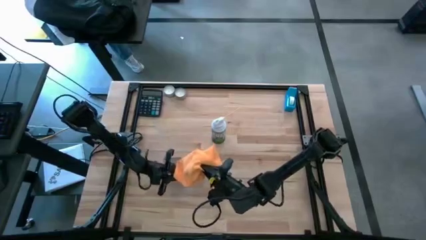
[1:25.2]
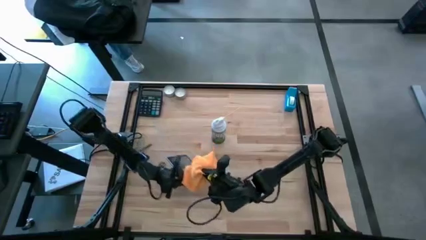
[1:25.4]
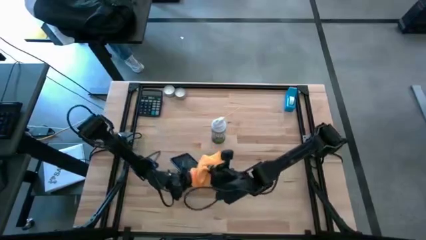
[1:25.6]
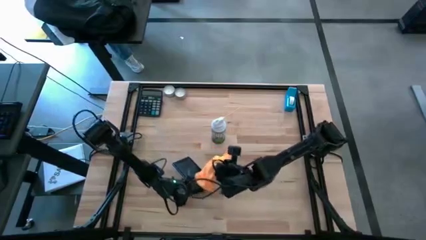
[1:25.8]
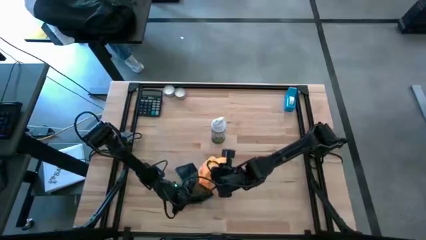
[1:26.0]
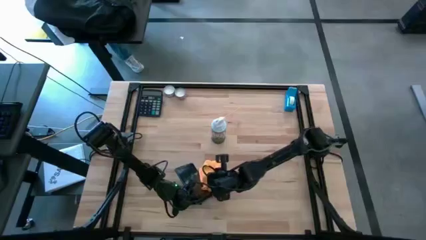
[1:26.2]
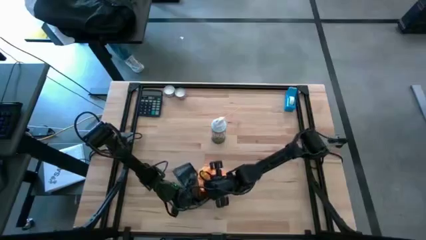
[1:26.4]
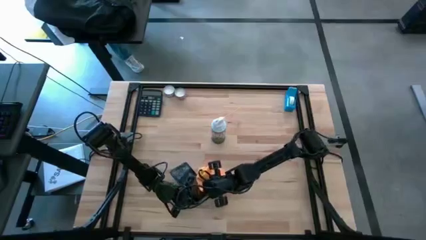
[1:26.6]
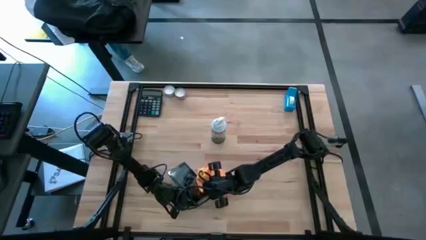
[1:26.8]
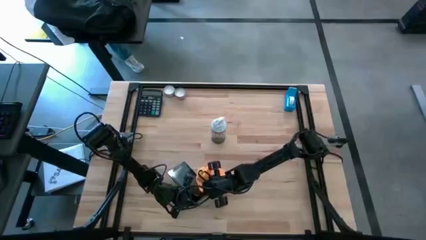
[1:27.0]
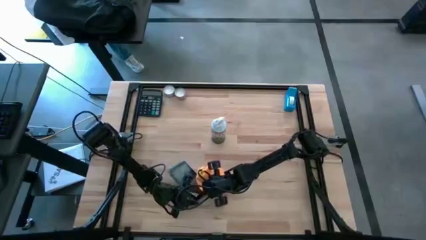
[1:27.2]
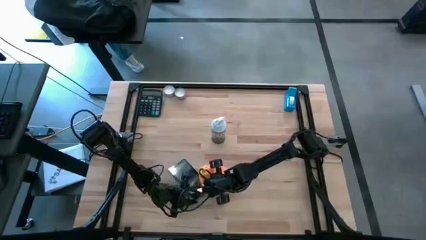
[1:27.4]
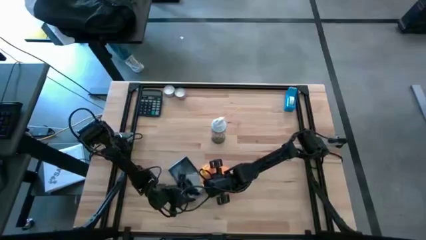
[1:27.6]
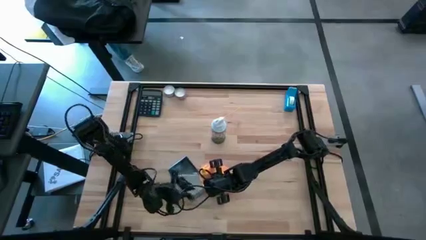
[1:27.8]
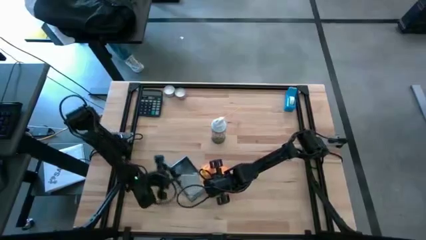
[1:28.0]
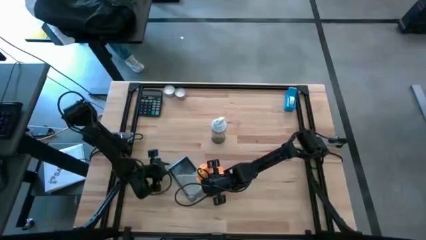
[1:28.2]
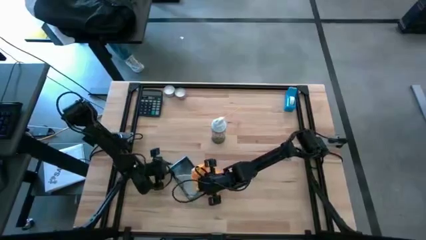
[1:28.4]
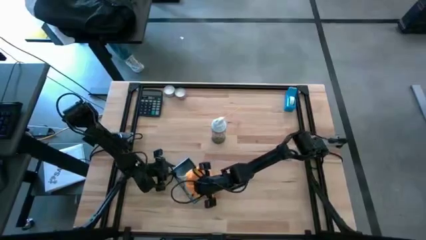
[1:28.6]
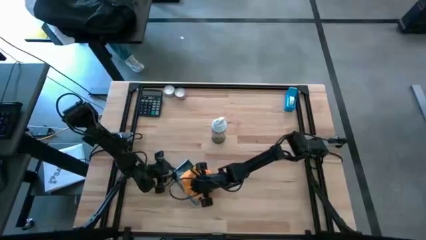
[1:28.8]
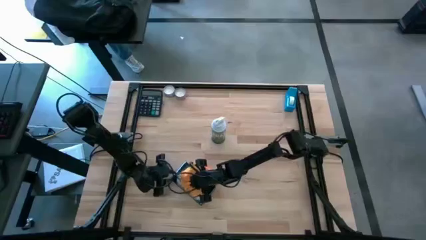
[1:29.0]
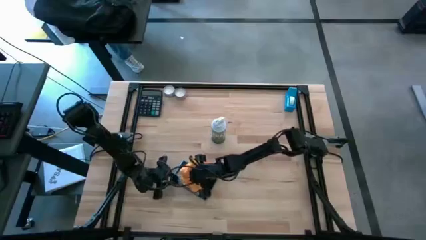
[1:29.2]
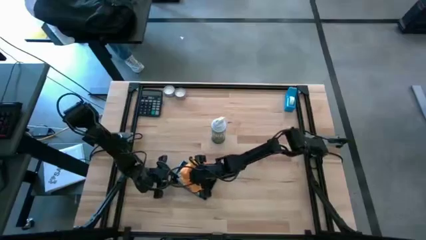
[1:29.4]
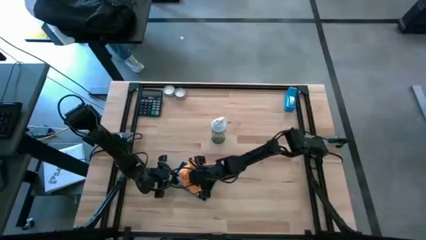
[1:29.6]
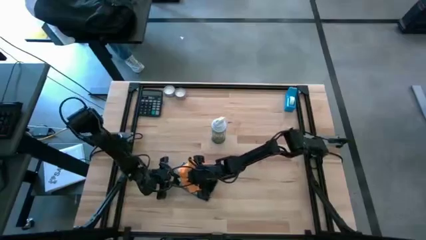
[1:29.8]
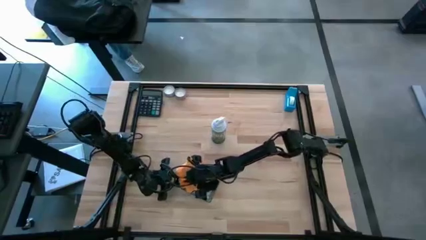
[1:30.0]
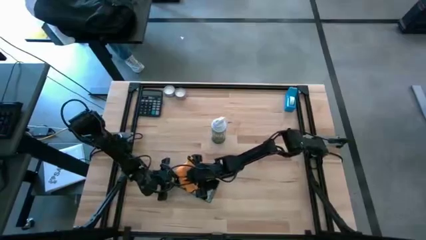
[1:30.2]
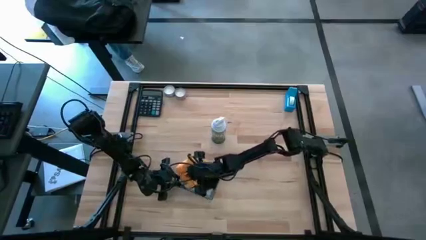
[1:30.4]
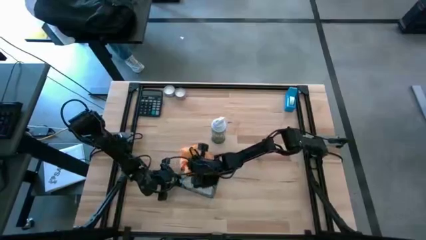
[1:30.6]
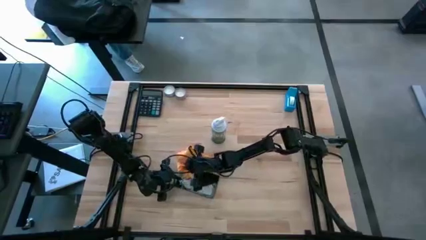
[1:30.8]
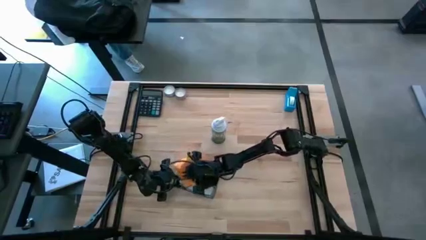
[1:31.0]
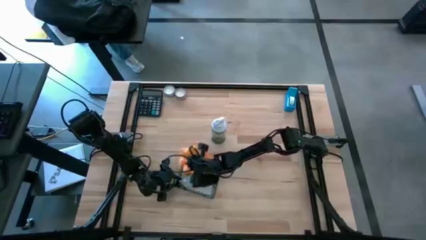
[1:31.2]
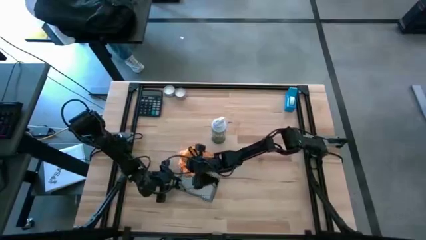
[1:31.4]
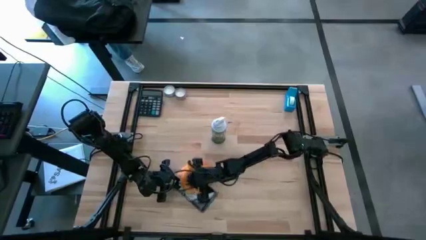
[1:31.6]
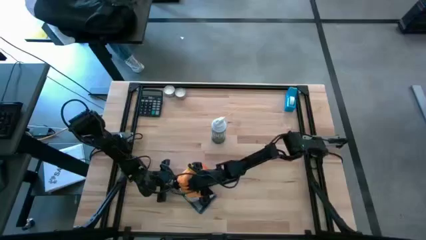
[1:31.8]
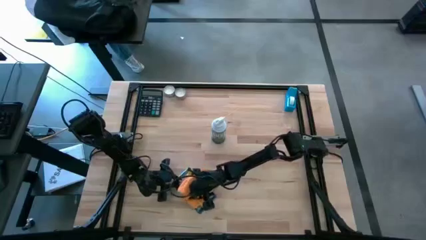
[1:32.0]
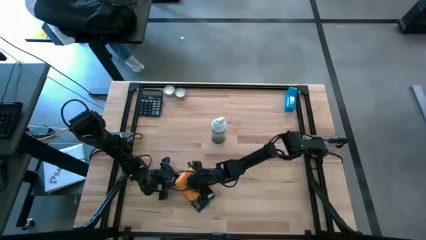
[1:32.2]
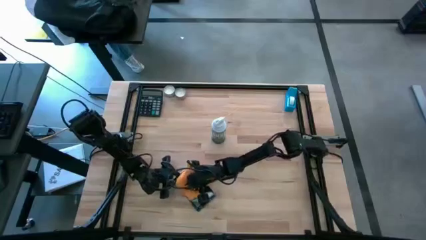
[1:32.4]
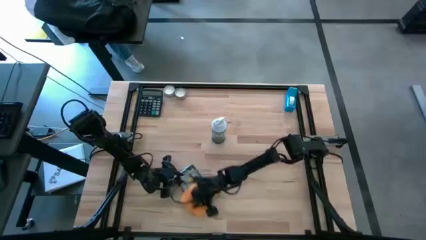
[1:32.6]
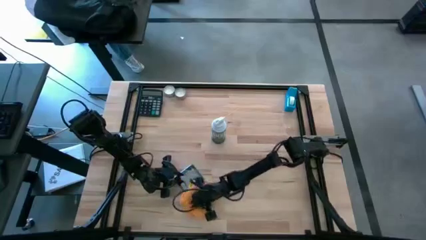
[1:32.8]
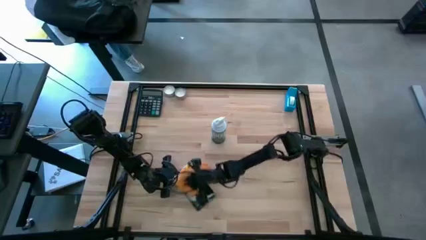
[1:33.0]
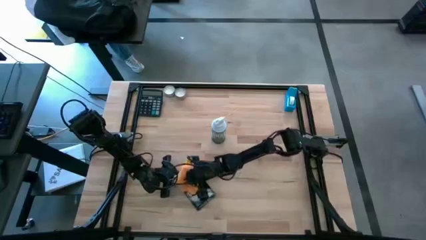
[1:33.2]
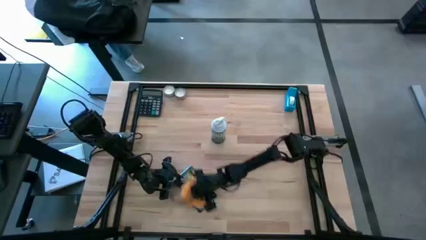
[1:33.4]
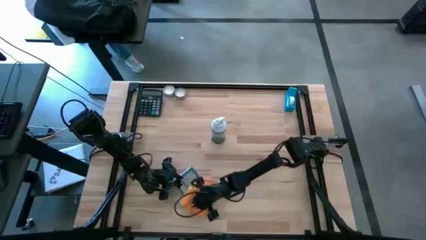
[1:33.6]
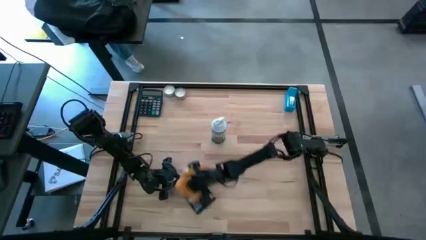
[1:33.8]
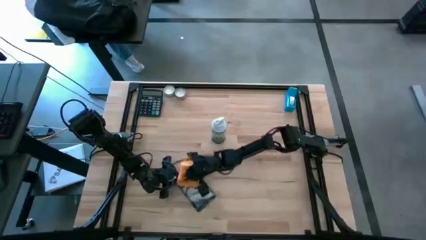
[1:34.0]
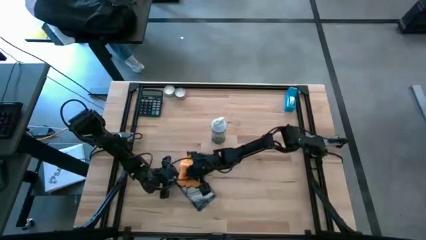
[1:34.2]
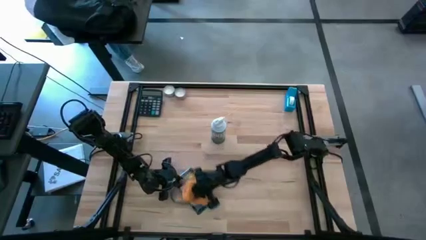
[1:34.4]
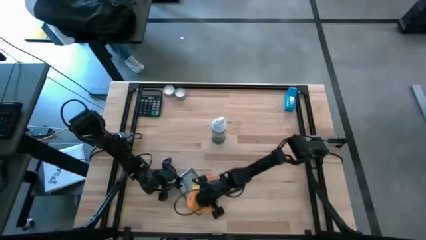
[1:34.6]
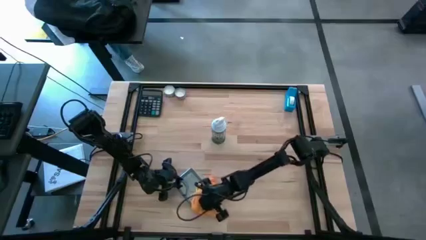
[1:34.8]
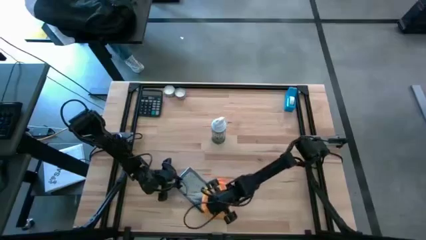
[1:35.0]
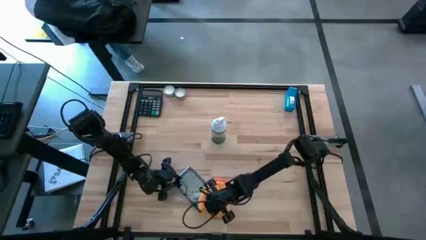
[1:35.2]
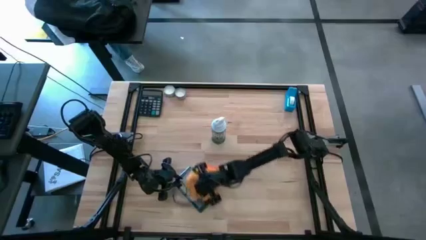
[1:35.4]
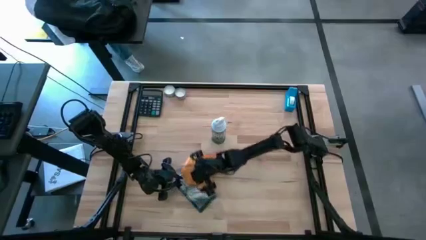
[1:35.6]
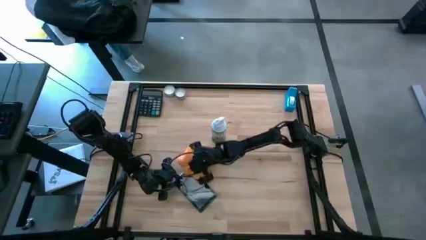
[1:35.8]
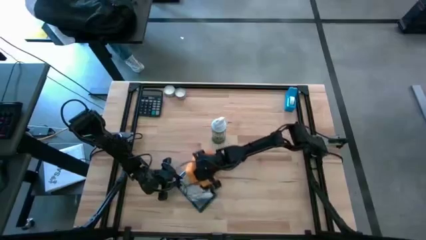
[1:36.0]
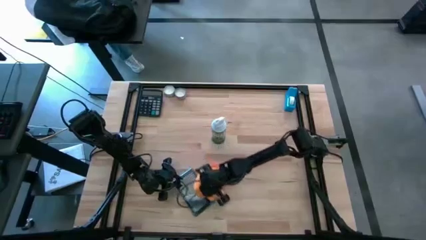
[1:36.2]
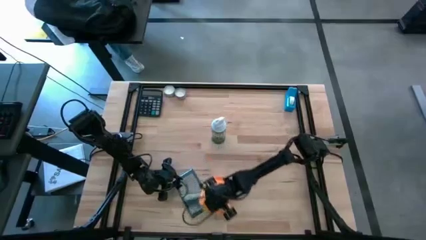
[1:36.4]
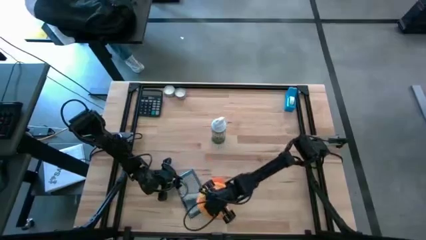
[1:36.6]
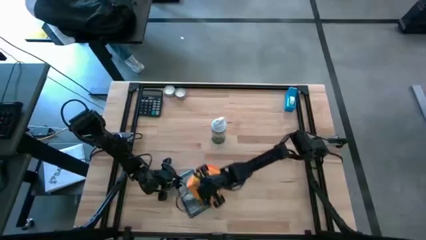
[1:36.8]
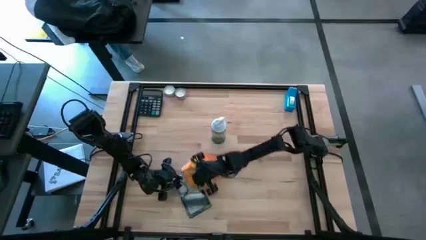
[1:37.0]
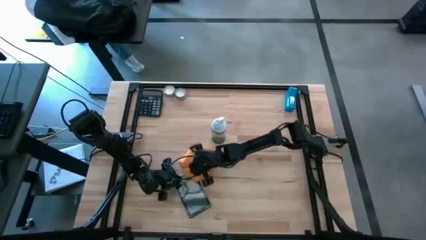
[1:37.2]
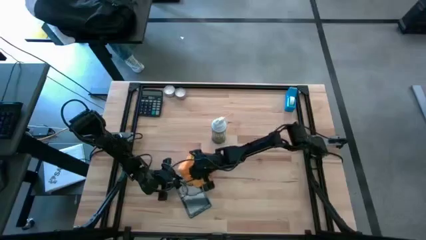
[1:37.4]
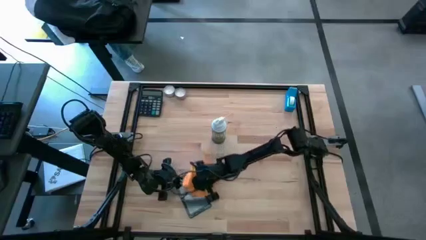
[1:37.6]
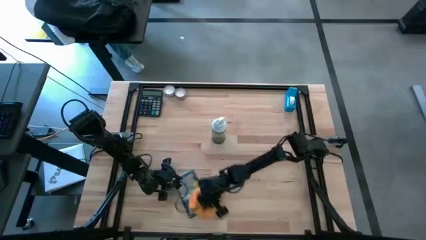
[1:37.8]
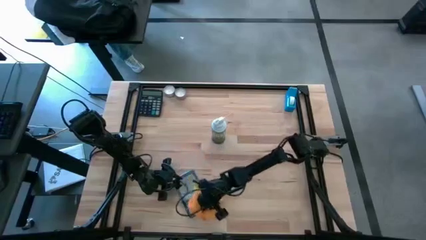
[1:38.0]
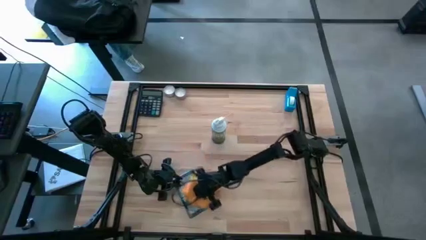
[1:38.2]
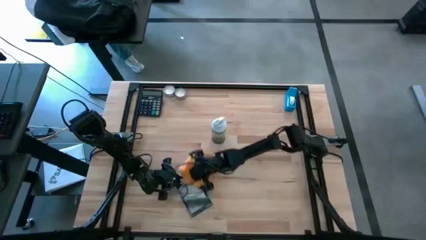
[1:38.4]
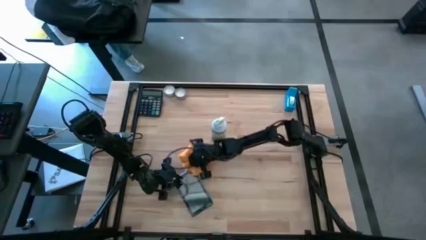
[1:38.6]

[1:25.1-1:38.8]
Task: Apply microfiber cloth
Wipe the front of the blue tablet using the orange microfiber cloth

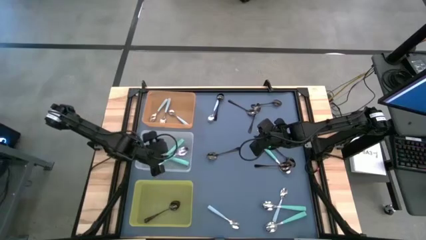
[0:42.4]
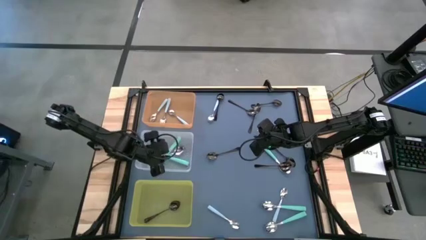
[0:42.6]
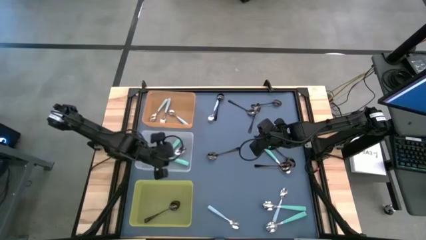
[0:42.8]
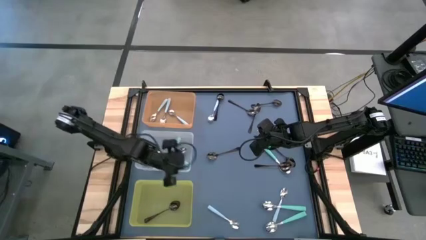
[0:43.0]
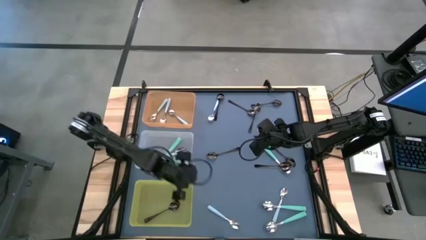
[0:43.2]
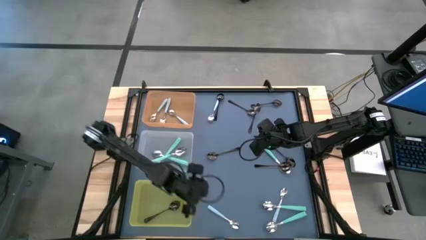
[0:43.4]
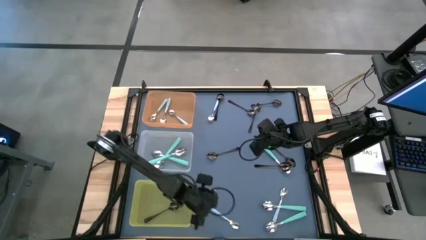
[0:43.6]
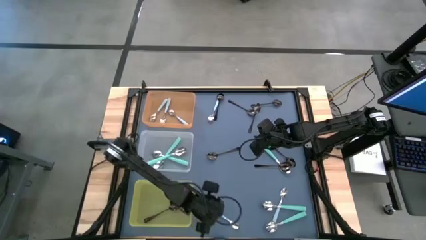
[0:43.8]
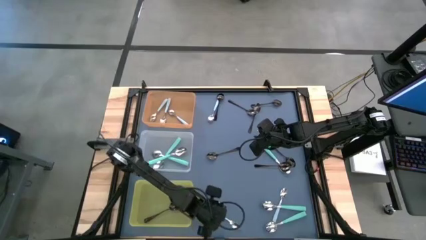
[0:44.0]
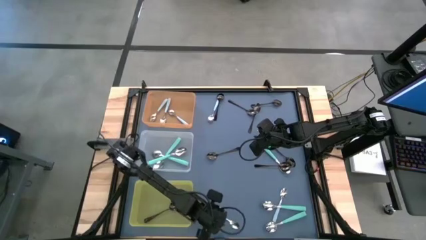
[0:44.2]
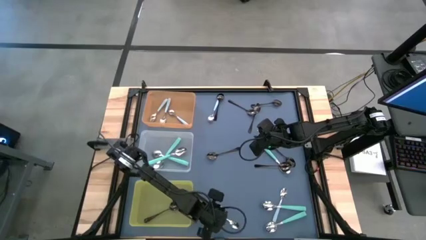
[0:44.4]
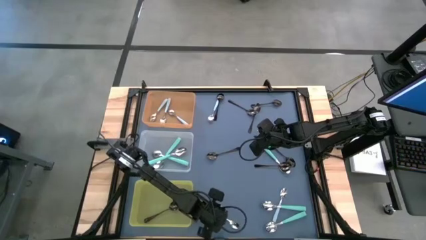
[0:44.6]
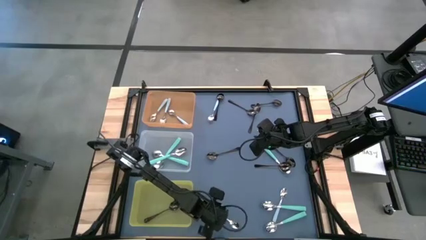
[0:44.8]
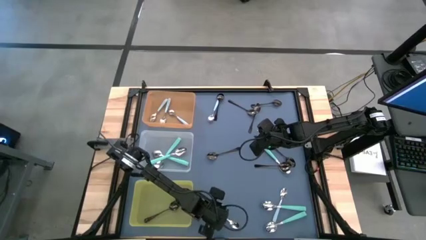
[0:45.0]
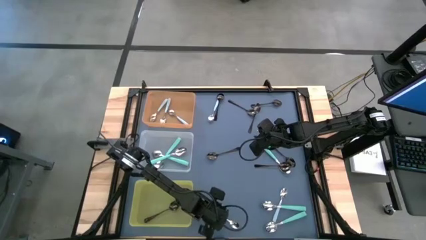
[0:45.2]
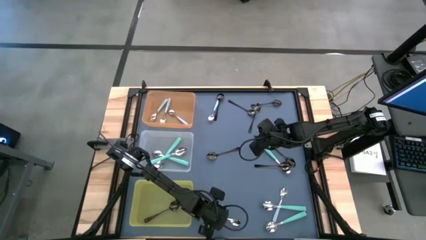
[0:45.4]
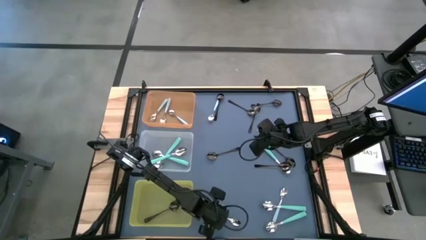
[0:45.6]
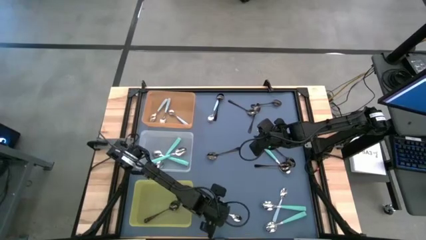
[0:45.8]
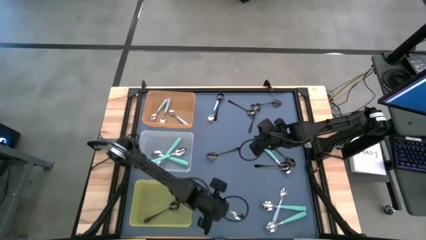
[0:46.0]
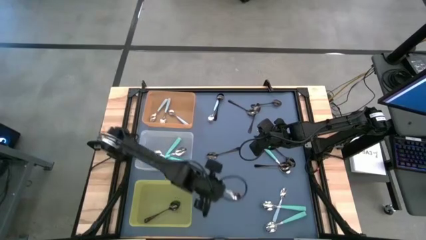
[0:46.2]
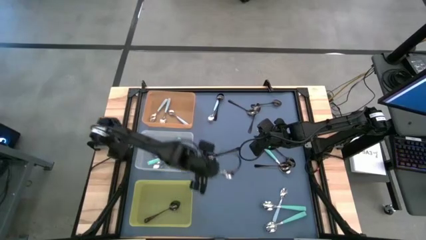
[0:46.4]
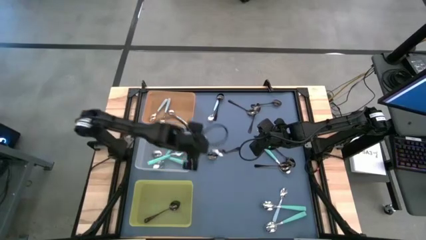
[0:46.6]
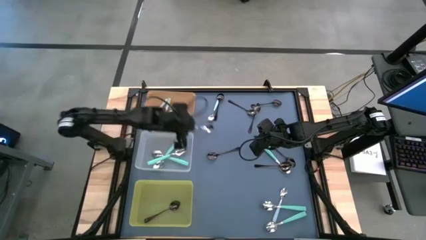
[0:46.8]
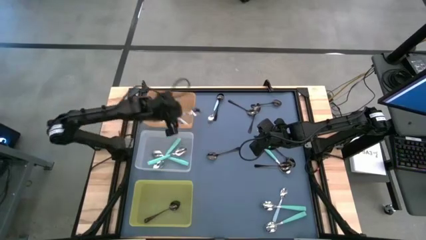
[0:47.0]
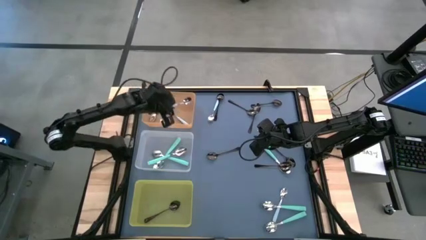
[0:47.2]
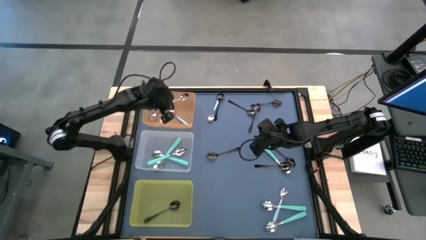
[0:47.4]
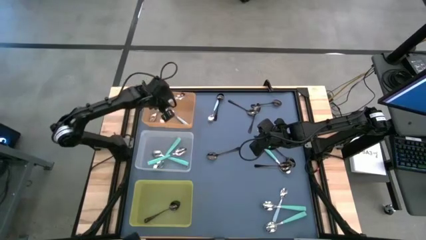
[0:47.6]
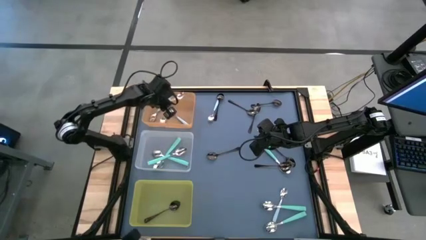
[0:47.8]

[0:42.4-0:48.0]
Task: Sort silverware by color (type)
Put the light blue spoon into the orange bin
